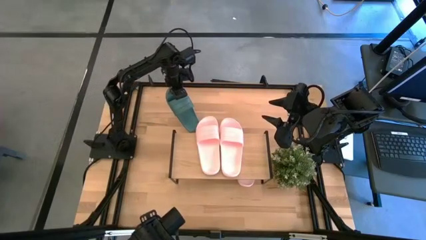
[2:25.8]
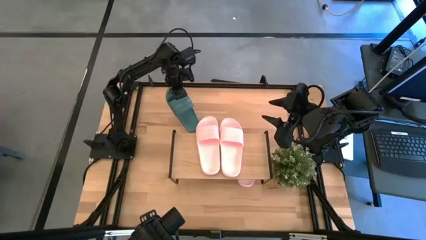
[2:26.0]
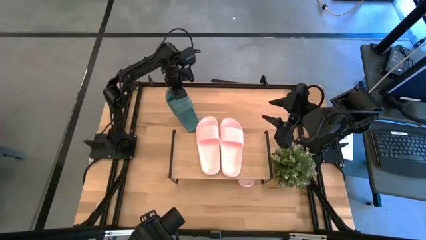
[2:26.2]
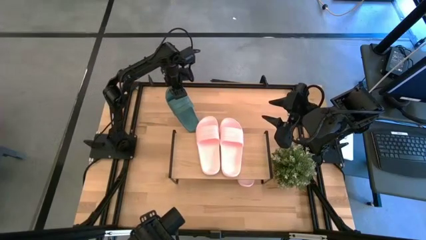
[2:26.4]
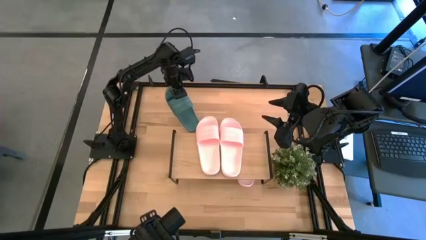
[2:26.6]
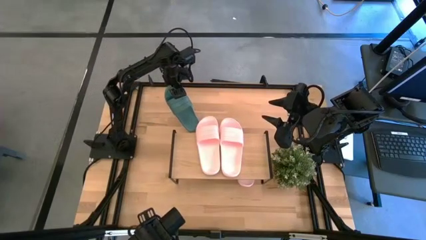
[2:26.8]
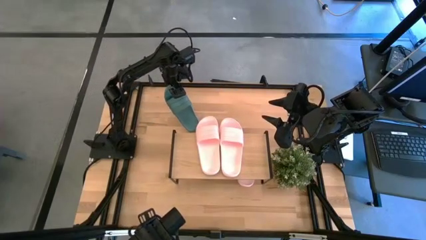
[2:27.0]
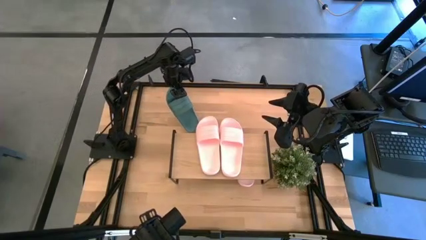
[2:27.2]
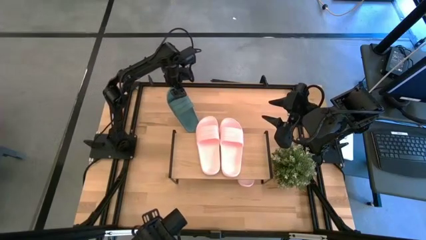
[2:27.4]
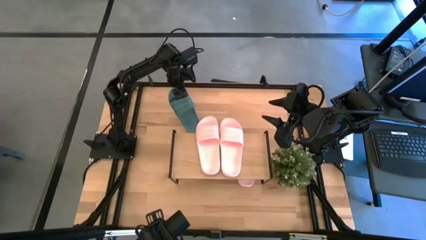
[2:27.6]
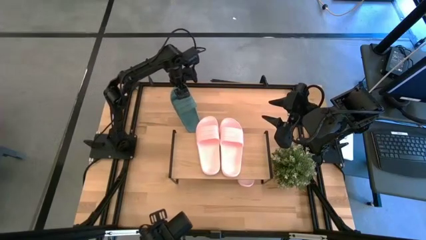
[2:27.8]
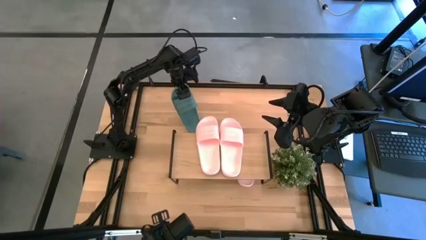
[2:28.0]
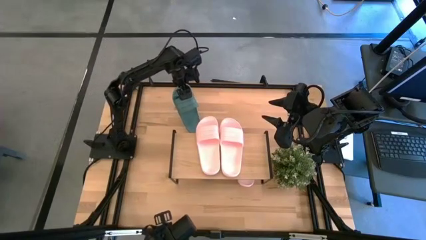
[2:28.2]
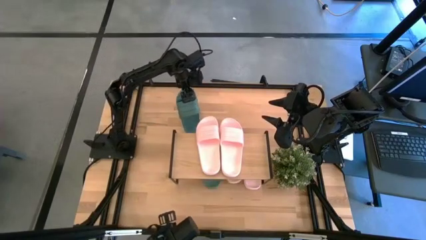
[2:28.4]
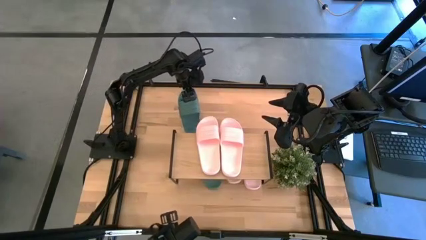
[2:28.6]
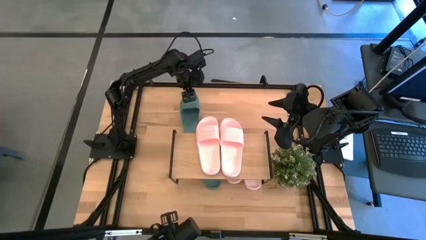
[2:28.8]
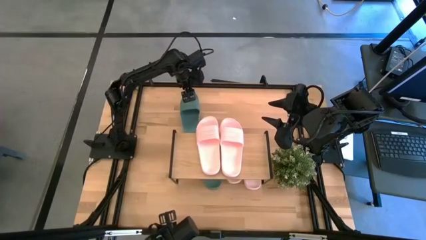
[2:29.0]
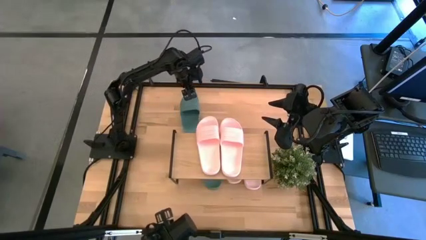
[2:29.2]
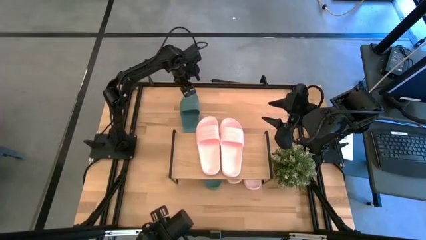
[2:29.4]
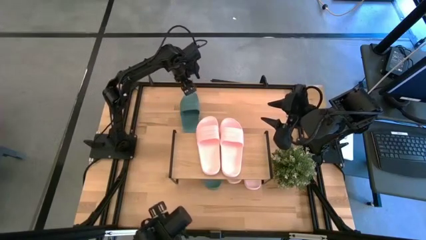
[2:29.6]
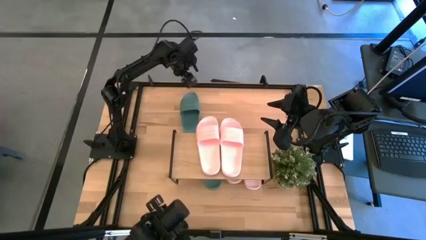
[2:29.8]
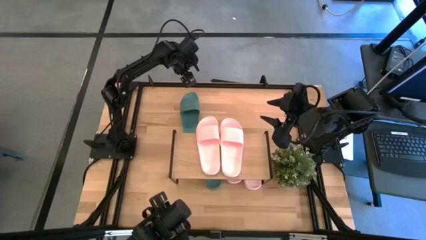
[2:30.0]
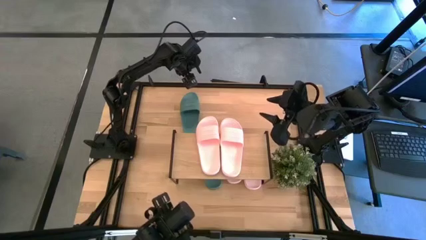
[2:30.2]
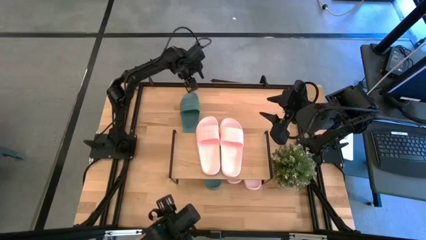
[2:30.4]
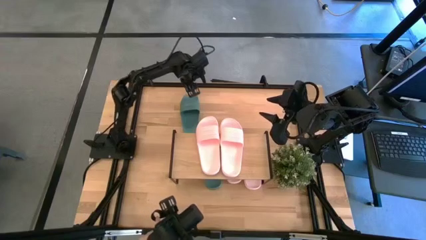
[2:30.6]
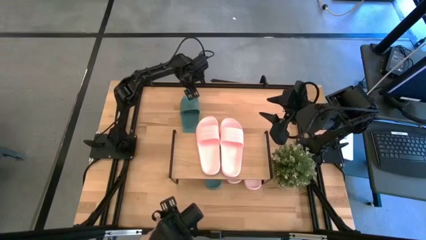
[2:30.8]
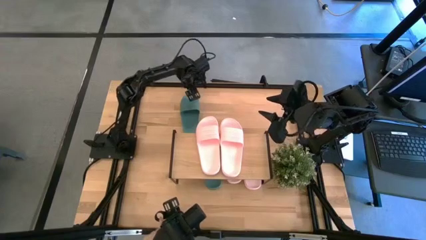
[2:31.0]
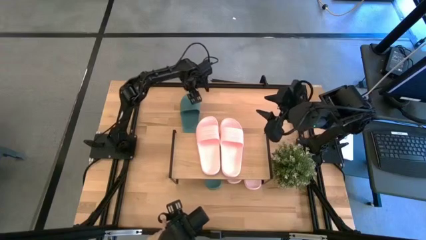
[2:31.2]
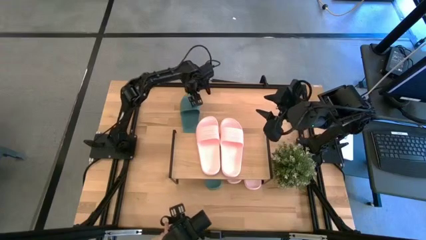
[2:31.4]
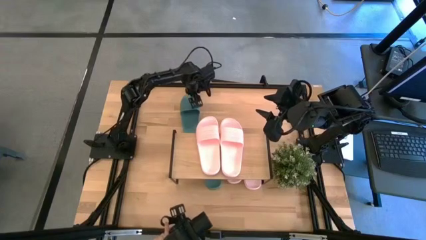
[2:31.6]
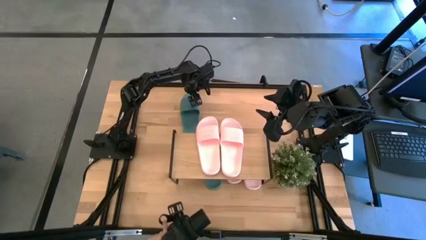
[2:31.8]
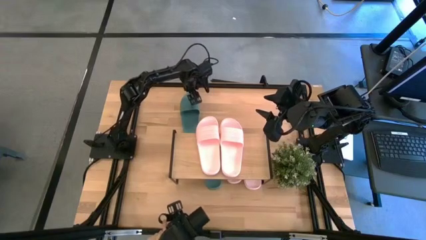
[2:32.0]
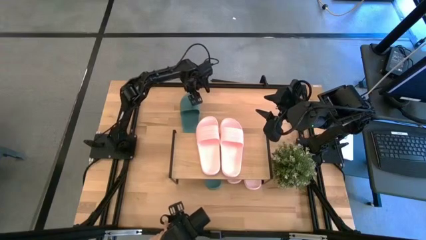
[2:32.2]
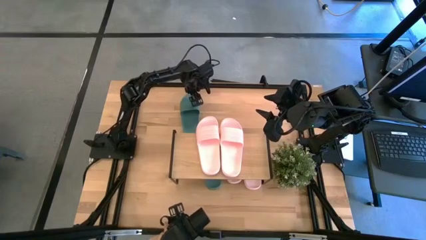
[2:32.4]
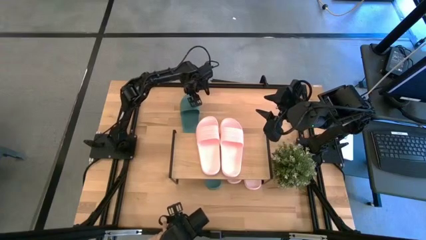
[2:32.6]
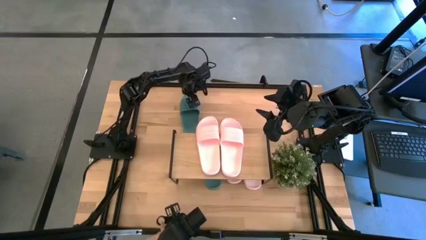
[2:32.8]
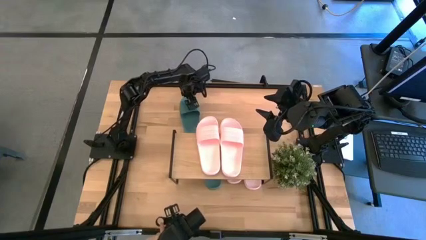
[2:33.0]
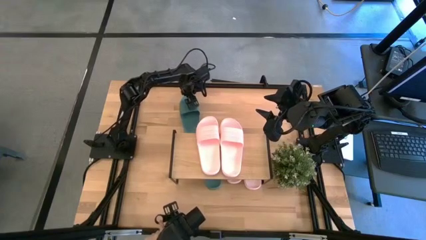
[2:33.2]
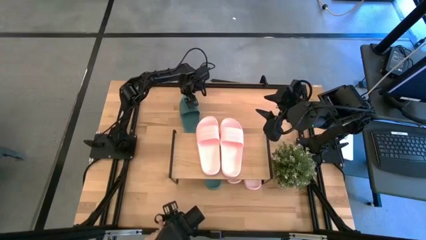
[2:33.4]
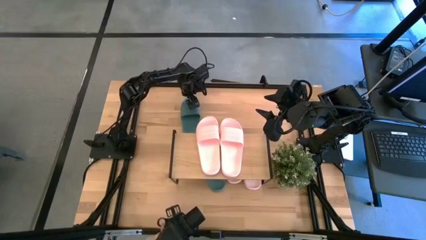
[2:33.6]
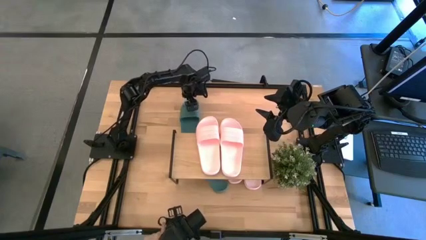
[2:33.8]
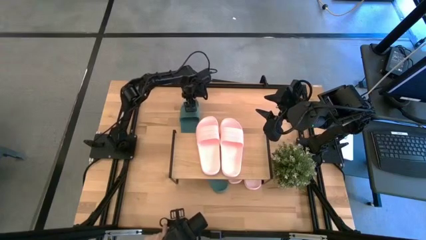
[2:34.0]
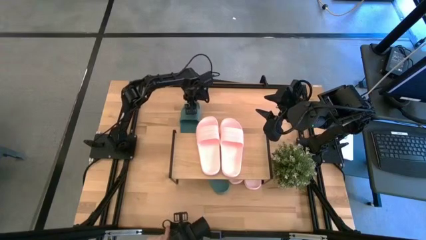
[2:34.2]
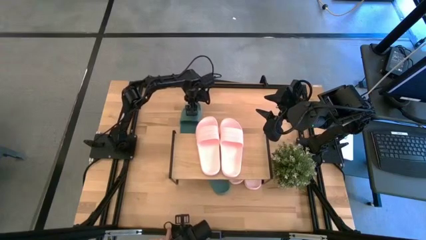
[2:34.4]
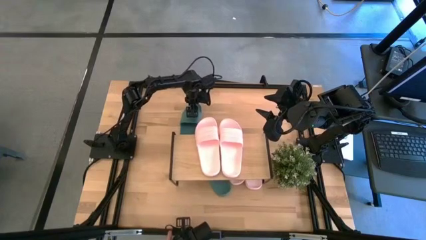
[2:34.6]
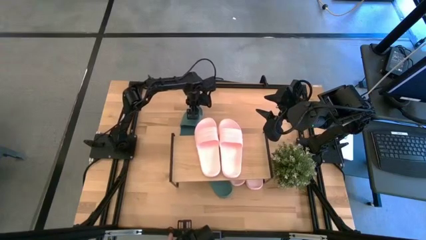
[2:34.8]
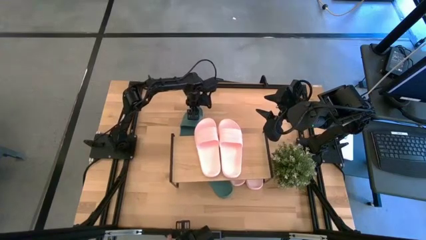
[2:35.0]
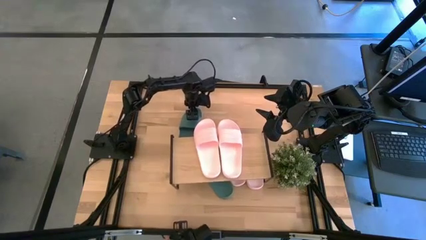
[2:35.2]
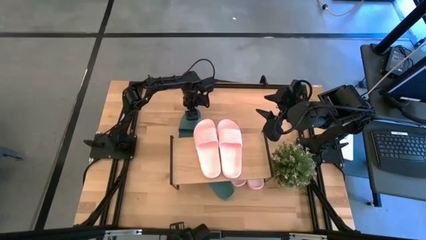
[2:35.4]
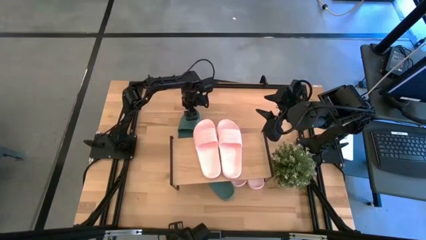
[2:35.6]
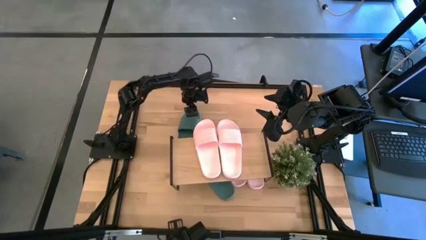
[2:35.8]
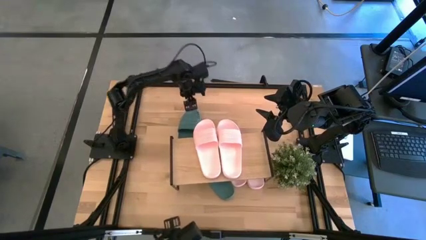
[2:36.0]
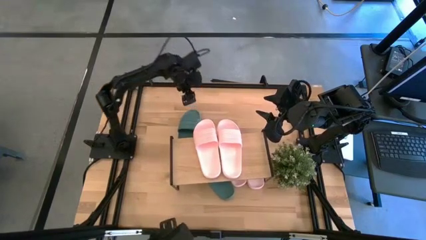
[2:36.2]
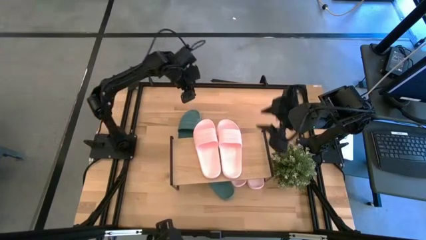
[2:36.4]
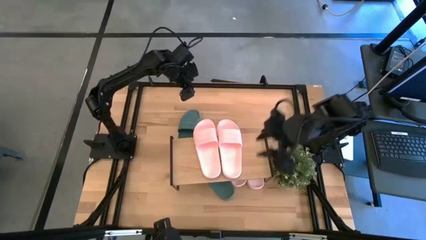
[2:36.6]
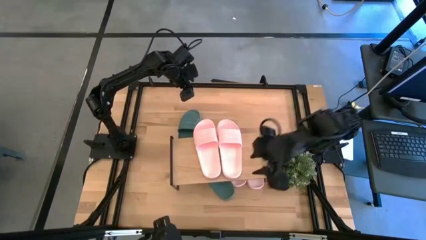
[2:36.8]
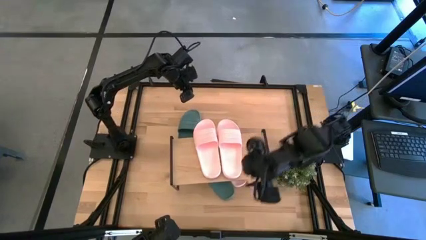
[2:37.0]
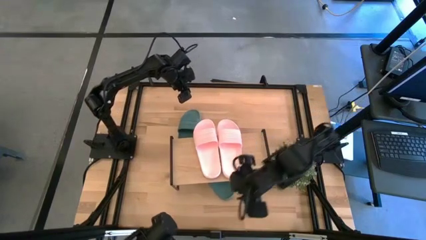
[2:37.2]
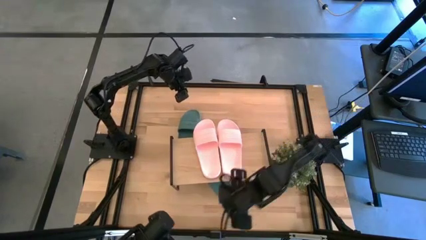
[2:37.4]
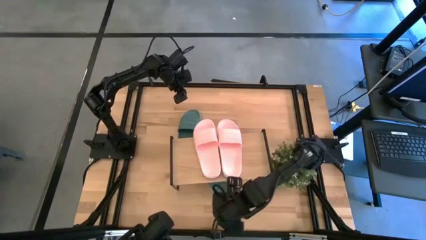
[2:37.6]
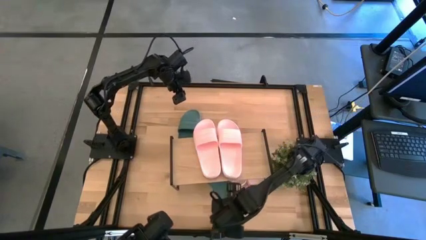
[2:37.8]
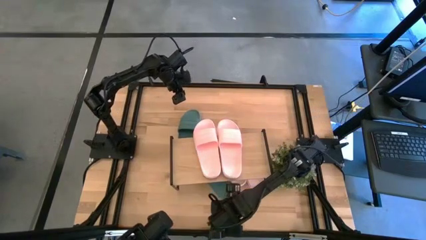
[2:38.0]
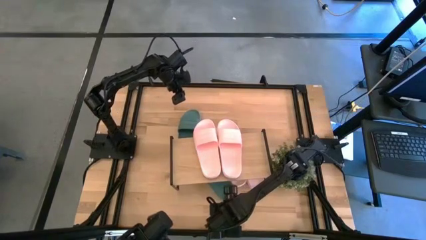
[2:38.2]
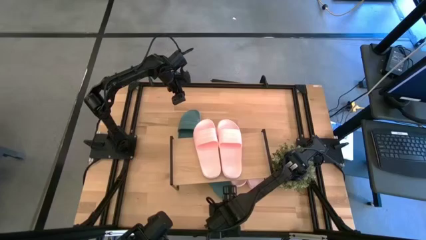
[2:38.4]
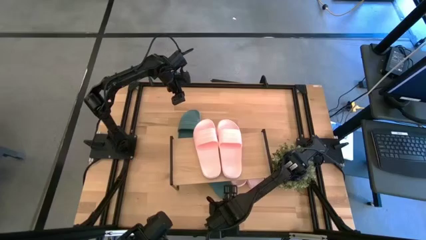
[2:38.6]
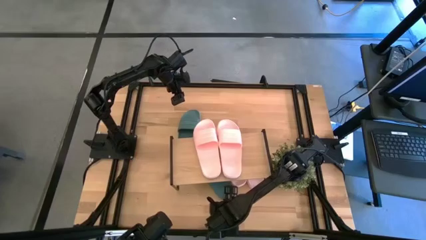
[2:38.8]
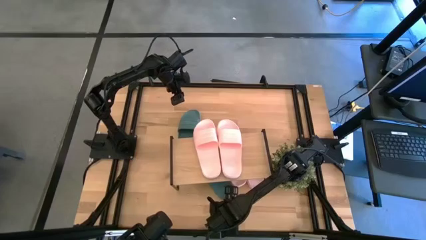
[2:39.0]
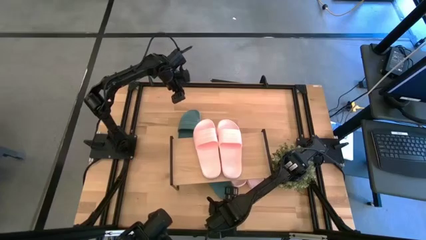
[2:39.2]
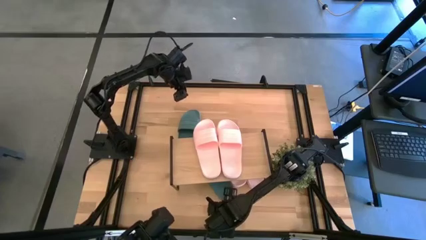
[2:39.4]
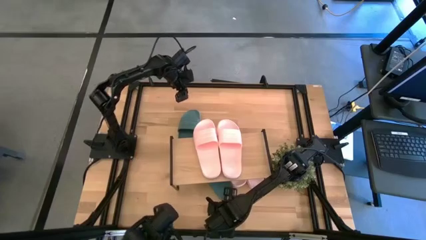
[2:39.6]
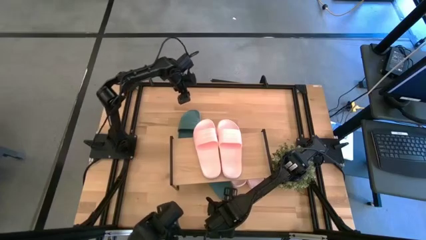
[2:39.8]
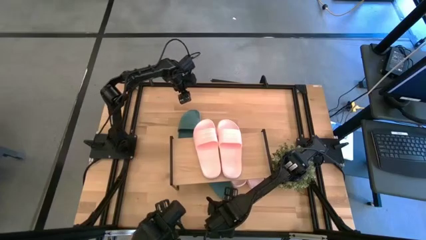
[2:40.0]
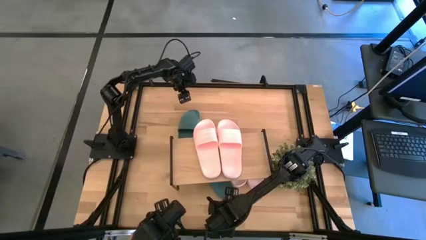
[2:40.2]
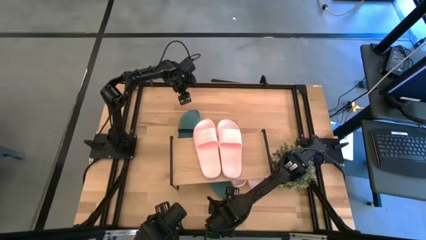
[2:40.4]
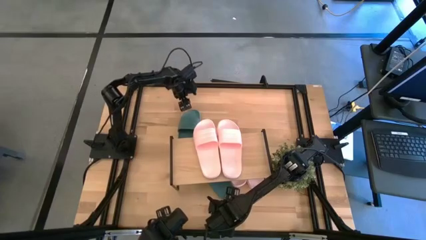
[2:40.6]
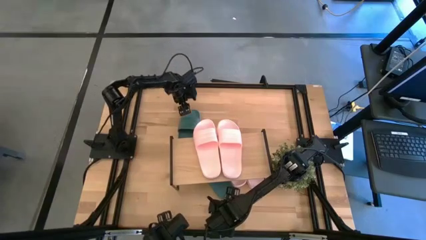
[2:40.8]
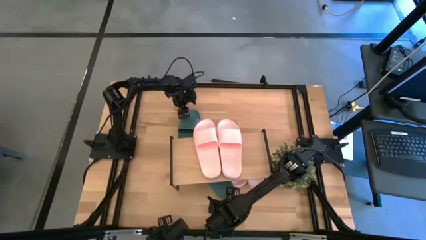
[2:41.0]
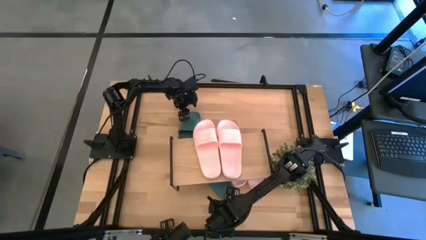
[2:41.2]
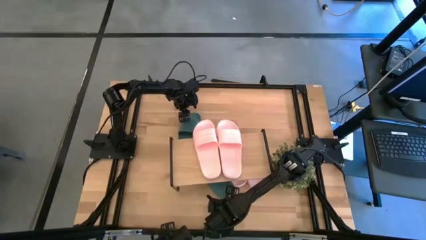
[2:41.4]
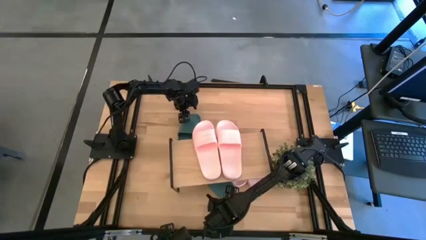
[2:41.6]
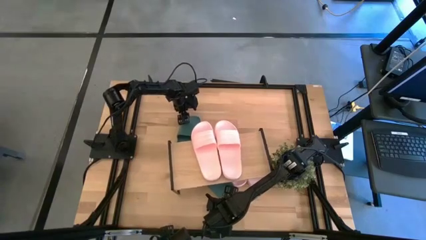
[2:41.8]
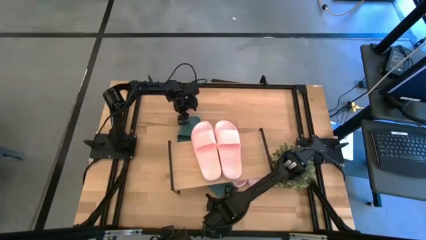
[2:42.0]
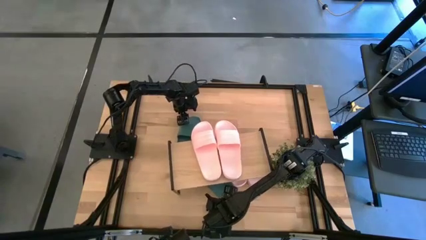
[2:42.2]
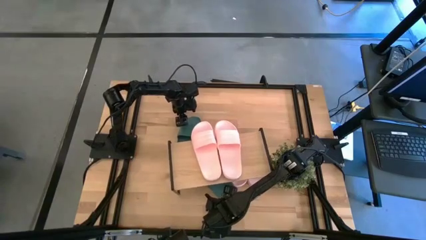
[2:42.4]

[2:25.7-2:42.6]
Task: Pick and place slides into the shelf
Put the green slipper under the shelf

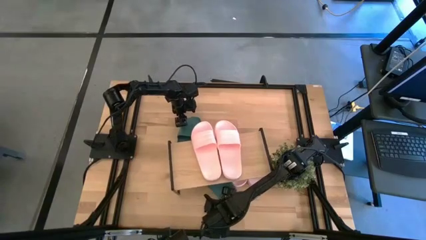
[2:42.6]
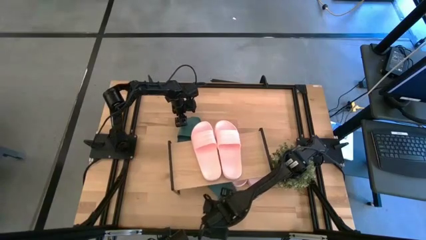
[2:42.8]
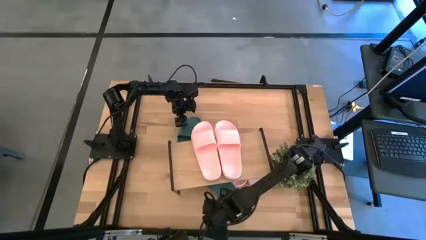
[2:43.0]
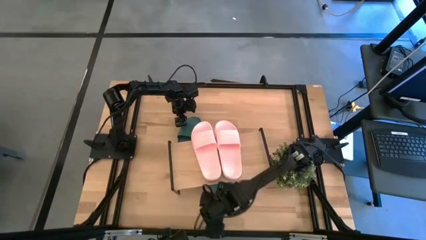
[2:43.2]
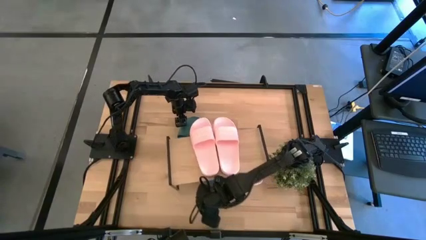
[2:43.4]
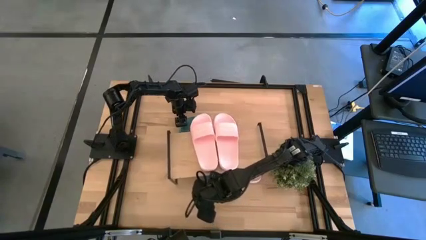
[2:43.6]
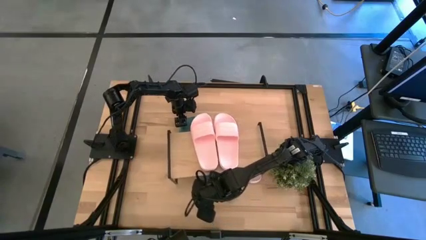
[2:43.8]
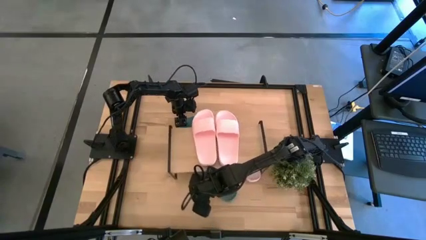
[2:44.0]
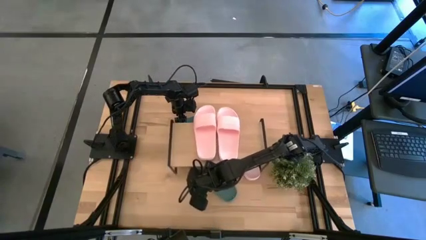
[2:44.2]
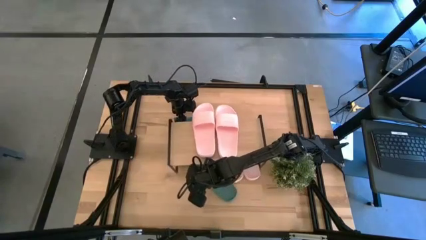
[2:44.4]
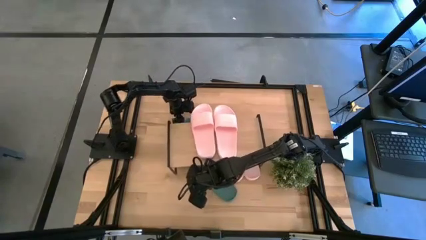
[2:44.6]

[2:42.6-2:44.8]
Adjust the shelf
